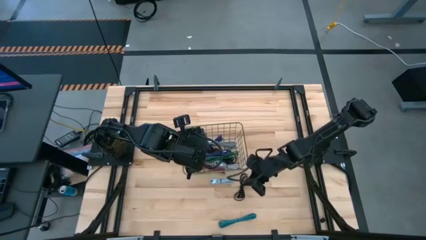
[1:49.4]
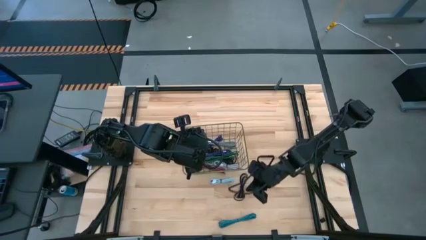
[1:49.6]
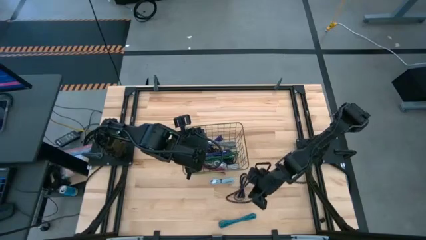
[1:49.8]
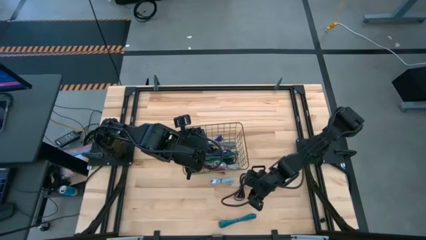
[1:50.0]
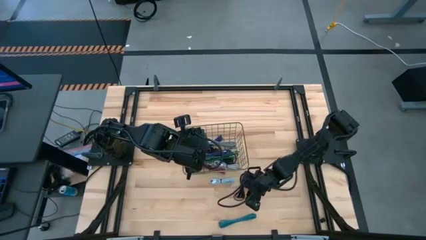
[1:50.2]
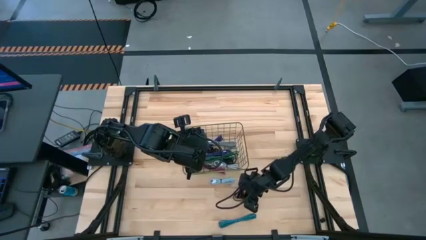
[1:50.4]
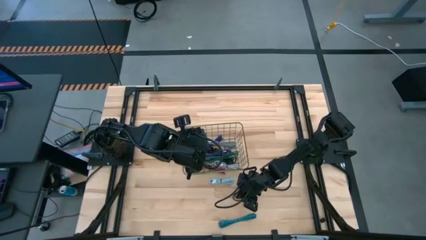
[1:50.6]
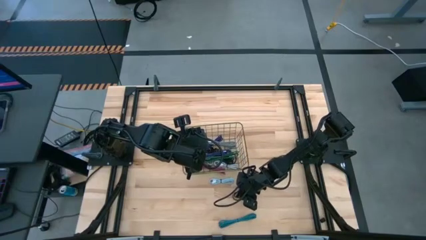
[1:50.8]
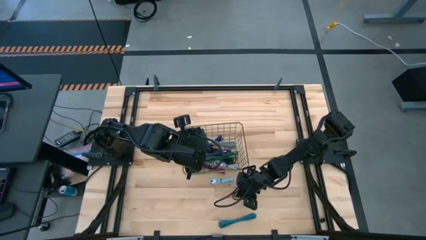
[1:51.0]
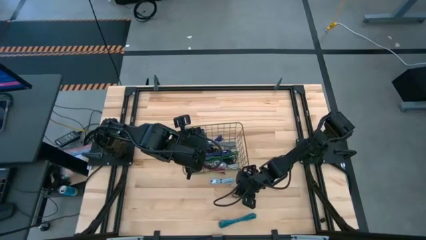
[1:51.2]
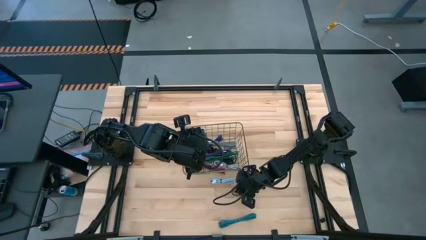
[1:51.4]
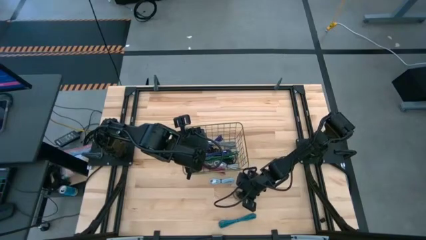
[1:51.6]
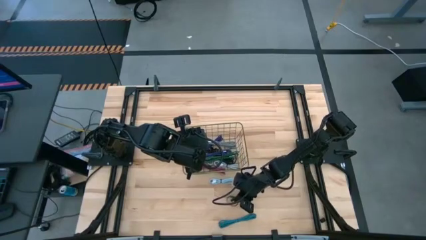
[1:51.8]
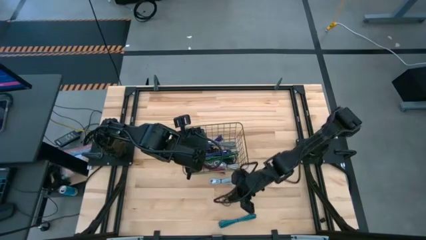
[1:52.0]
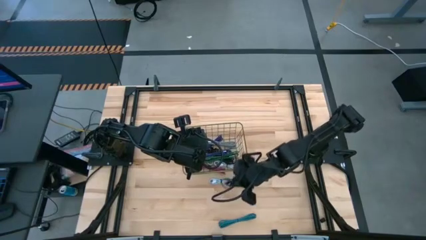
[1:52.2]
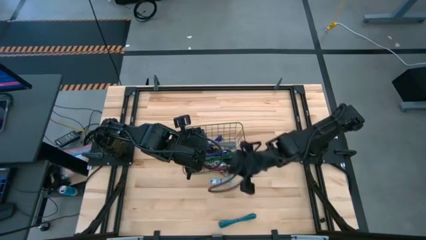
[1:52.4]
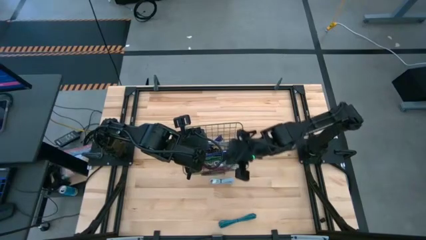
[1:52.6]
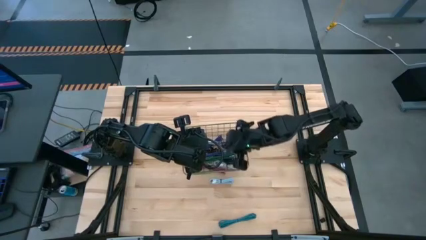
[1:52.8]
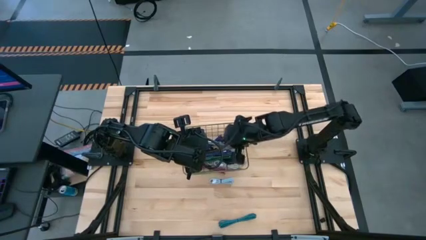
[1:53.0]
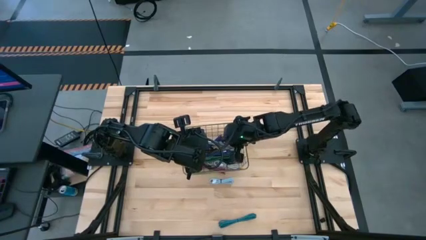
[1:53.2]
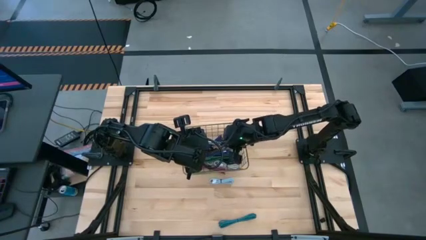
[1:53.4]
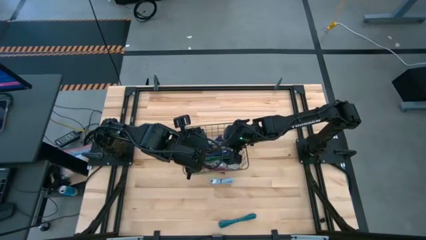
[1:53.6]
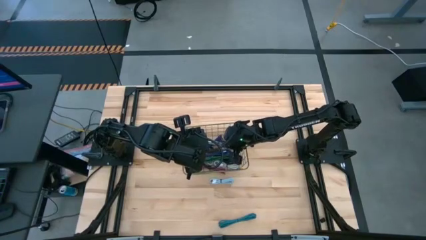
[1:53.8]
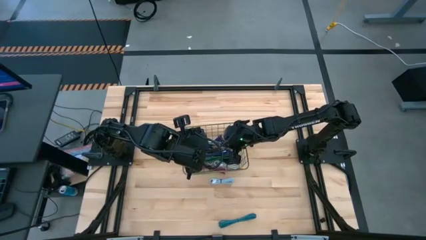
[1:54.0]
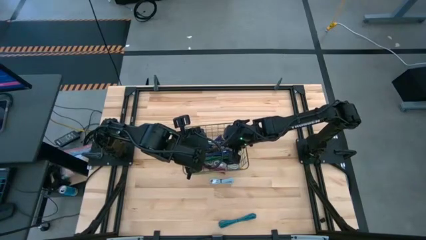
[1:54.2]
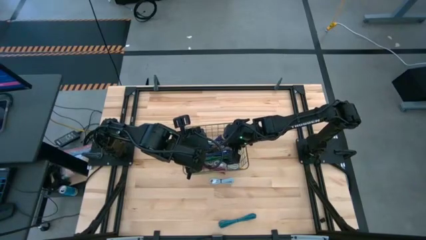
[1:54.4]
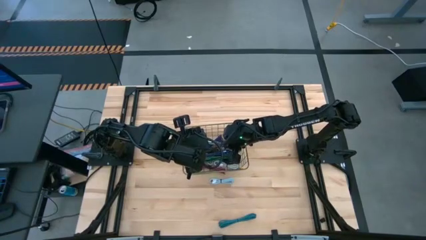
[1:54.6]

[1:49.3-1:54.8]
Task: Pick and place USB-C Cables
Put the black charger cable into the gold wire basket

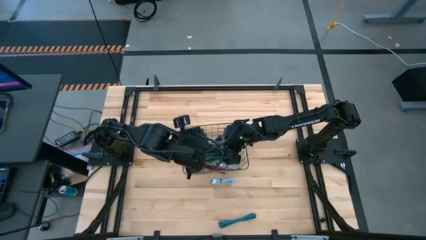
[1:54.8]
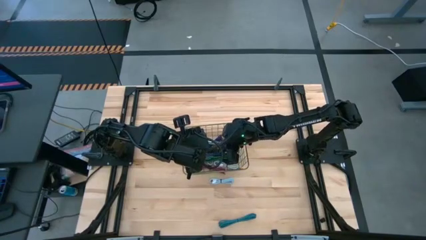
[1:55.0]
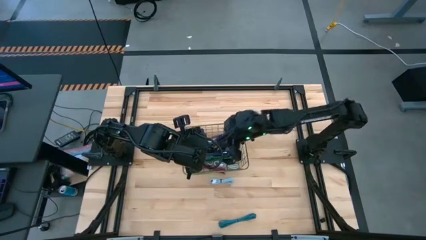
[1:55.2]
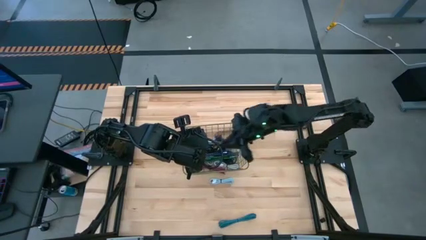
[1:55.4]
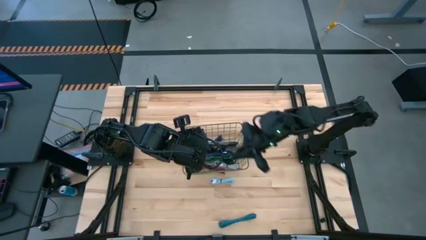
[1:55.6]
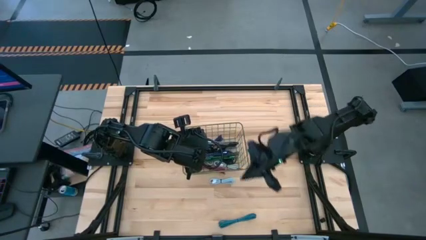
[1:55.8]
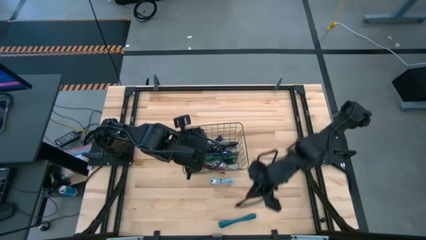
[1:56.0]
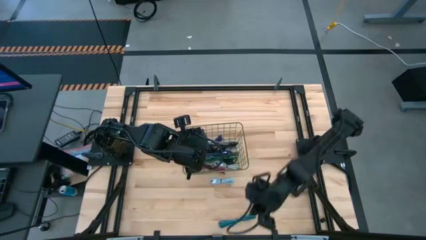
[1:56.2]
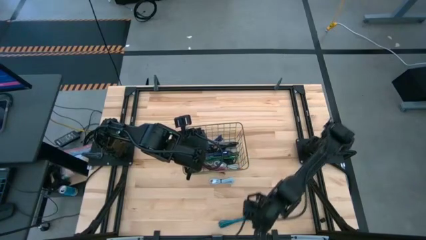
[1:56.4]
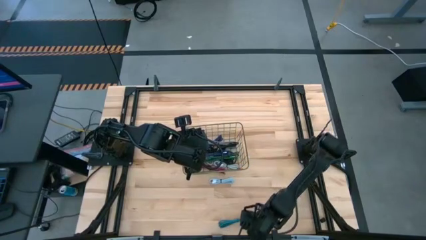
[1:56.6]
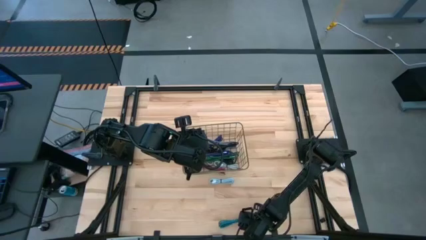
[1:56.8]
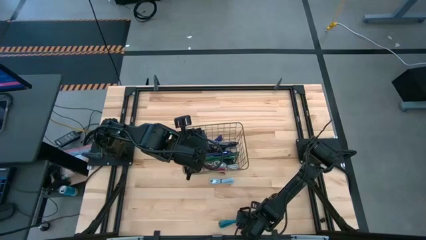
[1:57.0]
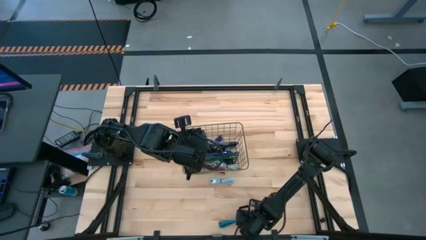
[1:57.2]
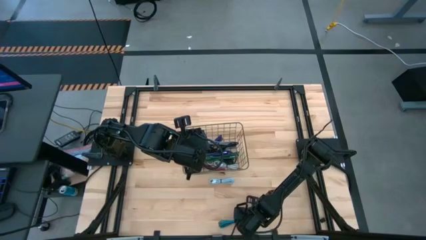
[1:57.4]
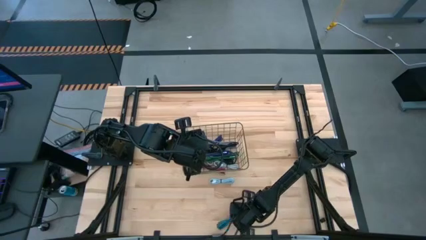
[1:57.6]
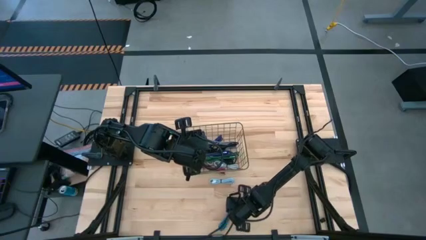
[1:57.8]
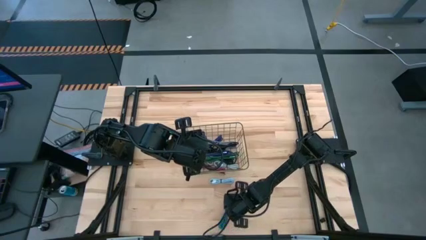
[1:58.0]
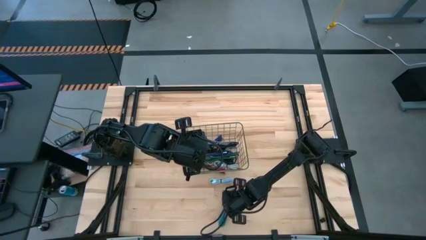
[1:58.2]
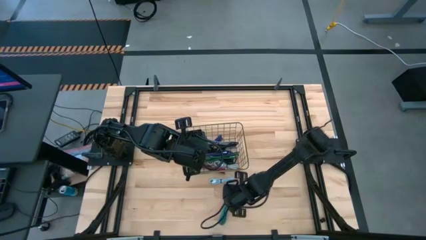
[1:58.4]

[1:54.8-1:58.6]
Adjust the blue patterned charger cable

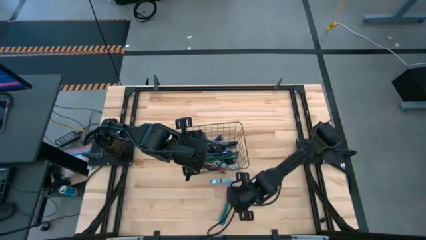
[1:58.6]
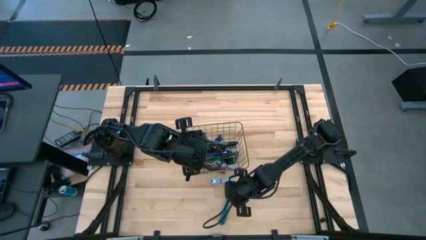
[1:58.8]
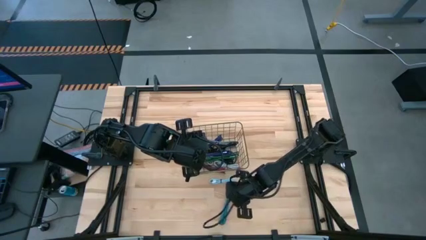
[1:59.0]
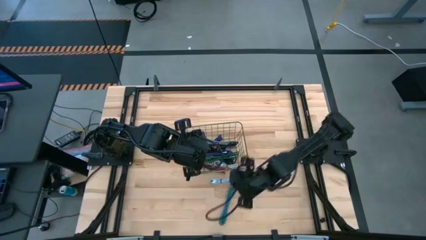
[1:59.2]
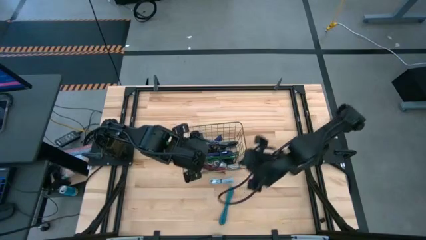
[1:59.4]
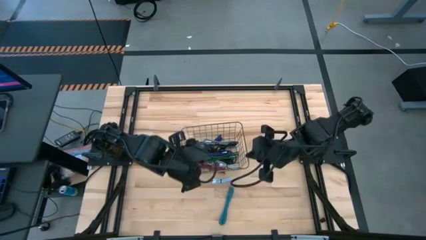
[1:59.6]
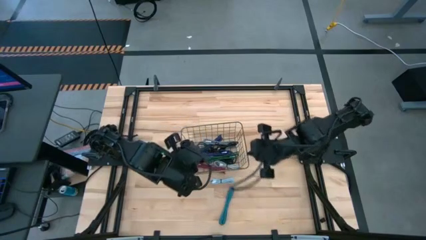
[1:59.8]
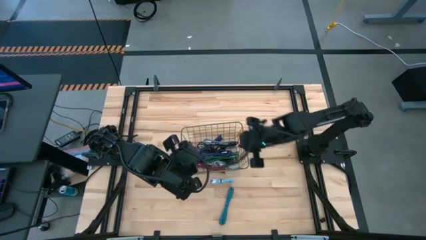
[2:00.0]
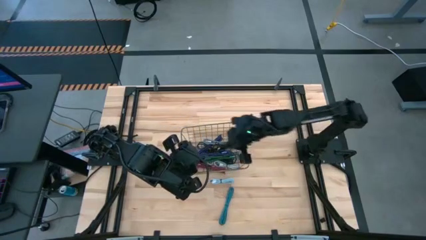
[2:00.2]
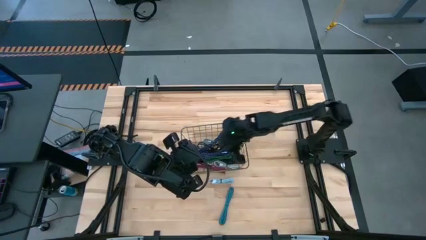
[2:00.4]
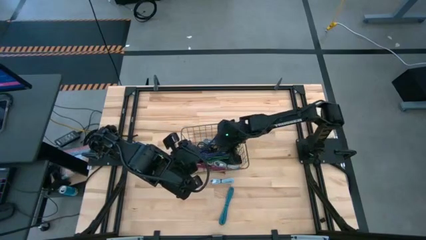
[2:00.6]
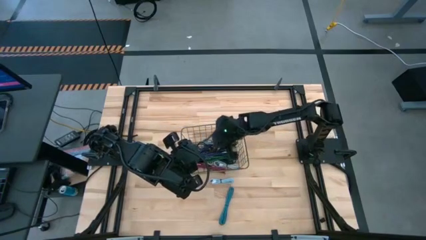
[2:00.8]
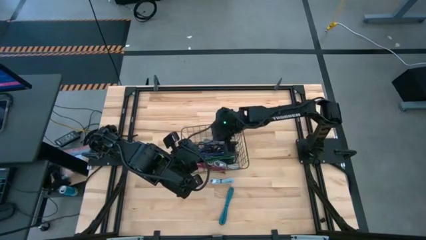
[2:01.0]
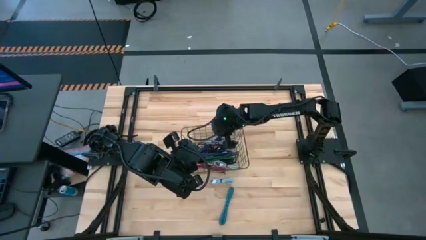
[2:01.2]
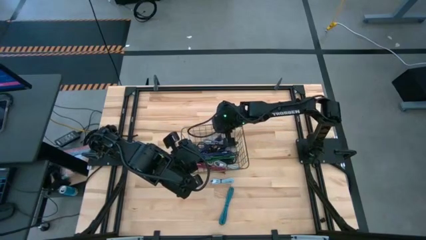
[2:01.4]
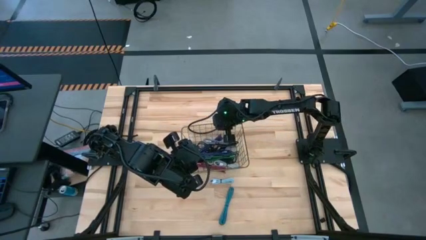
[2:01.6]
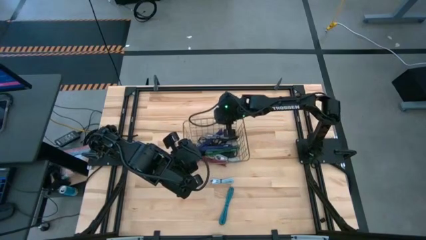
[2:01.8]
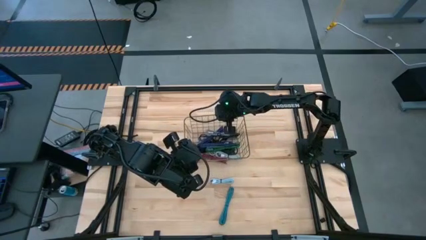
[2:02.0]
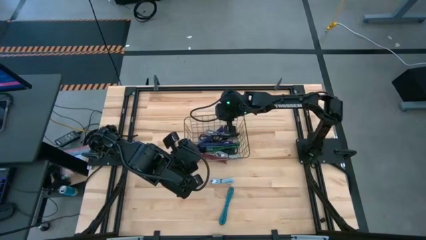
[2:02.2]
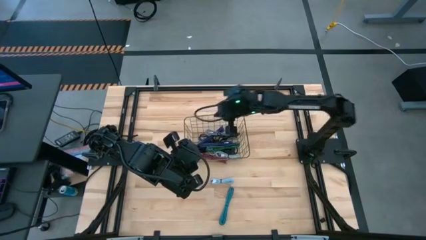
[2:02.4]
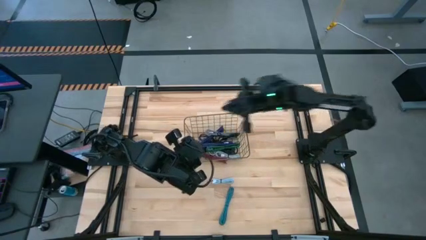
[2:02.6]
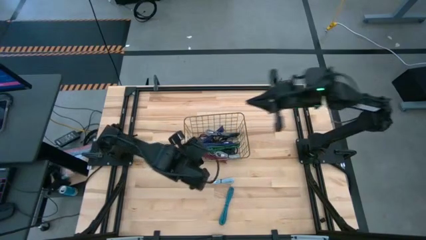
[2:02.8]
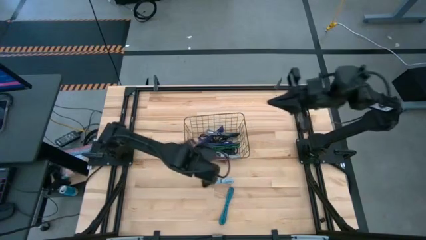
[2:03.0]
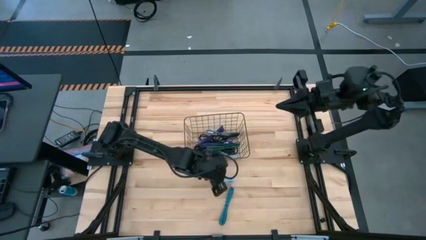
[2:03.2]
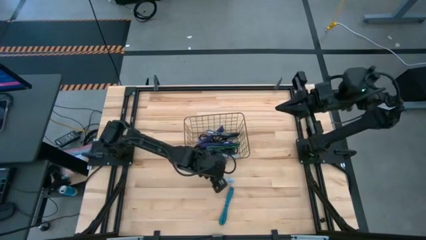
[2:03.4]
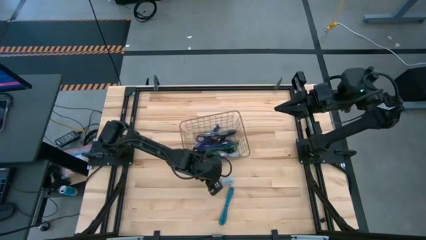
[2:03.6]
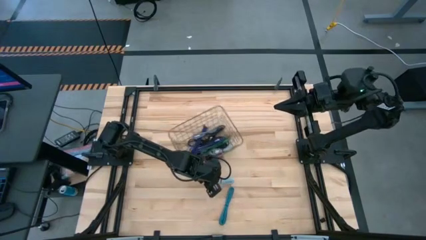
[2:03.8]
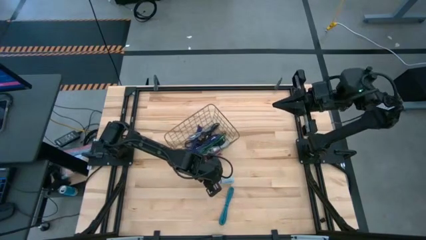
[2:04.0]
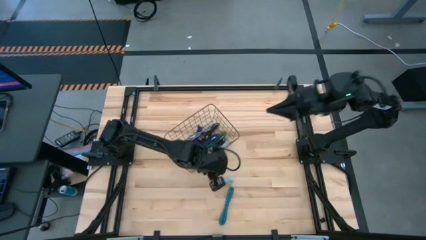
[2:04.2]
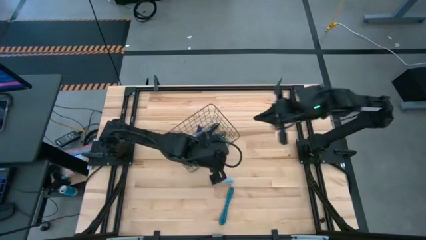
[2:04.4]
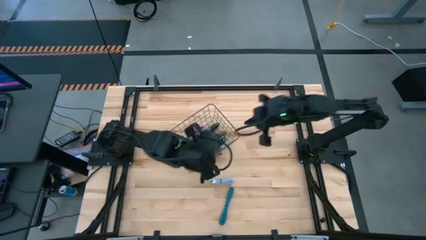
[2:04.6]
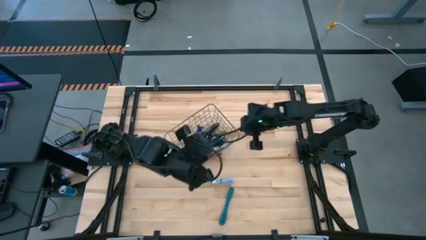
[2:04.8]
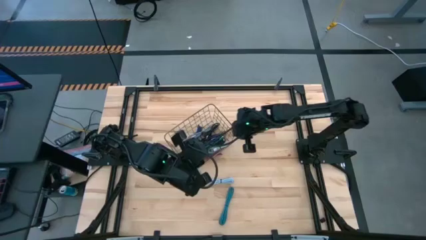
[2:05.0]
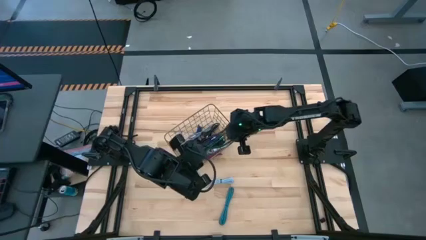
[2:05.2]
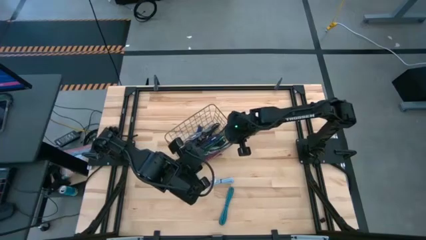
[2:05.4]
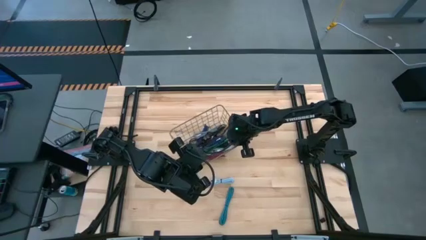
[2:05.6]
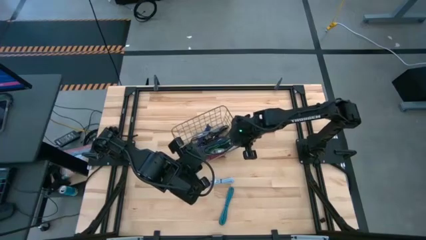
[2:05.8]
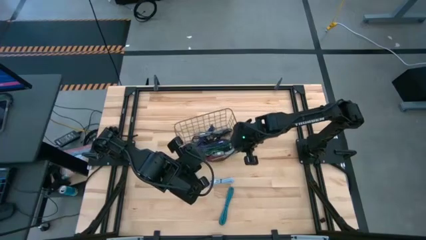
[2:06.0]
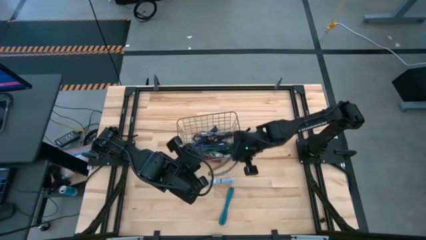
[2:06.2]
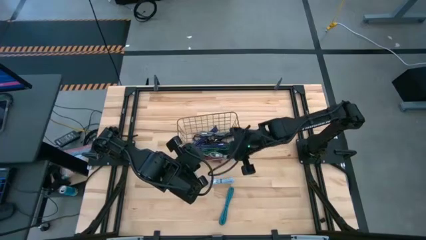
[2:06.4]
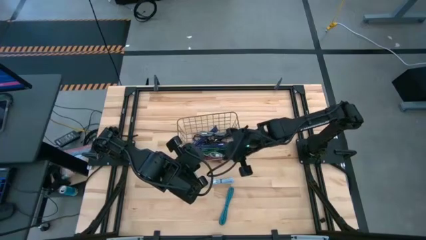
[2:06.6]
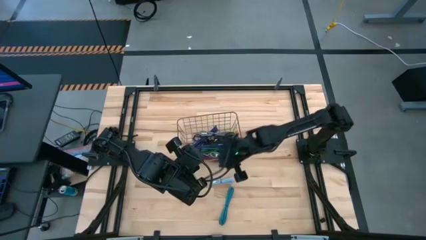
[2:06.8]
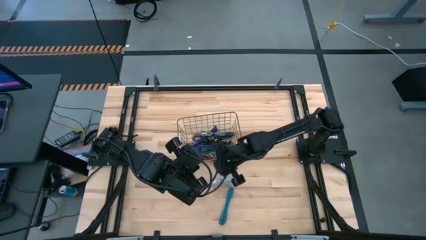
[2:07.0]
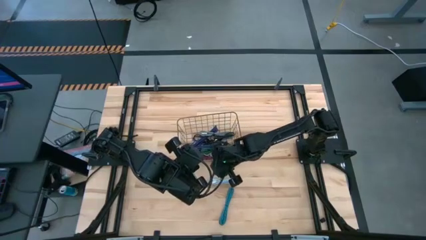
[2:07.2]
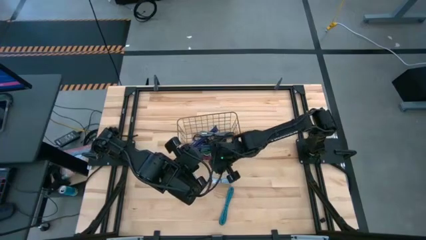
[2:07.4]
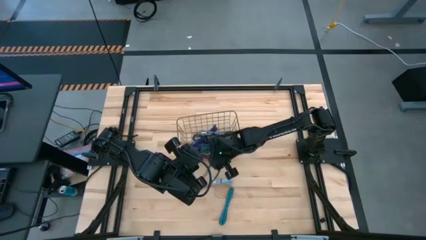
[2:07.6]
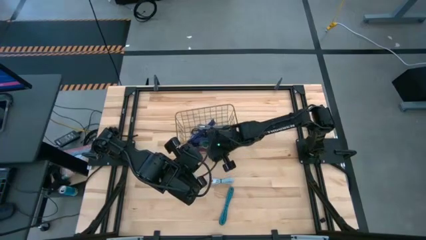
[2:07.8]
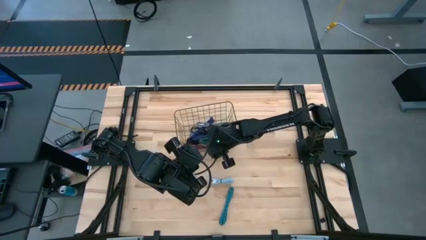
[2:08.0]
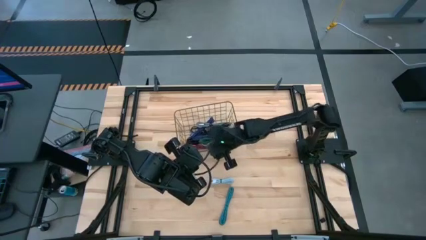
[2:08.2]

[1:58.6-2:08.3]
Adjust the gold wire basket
